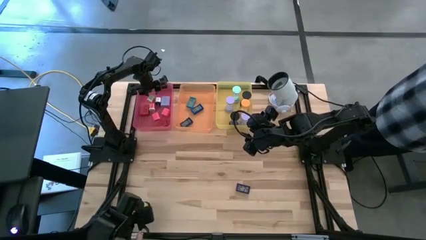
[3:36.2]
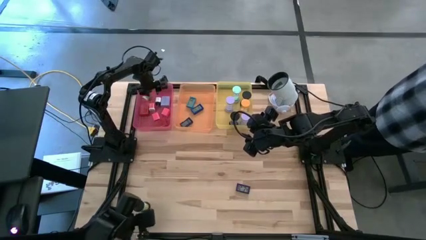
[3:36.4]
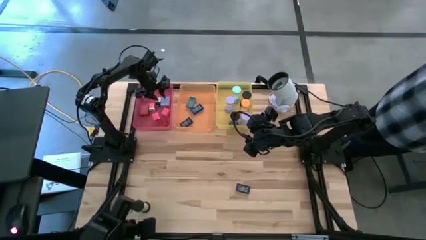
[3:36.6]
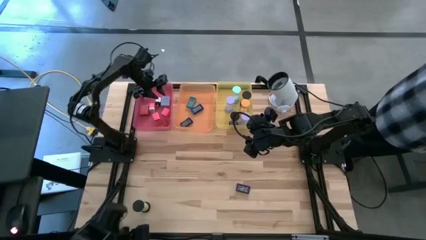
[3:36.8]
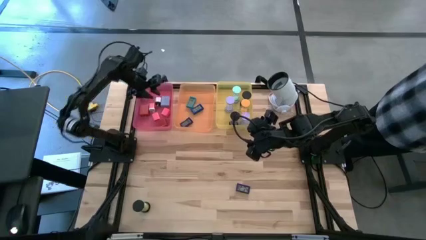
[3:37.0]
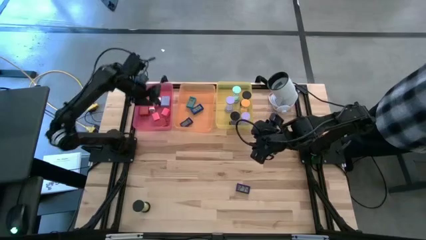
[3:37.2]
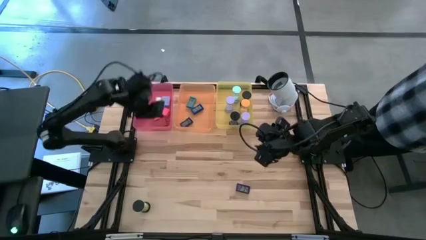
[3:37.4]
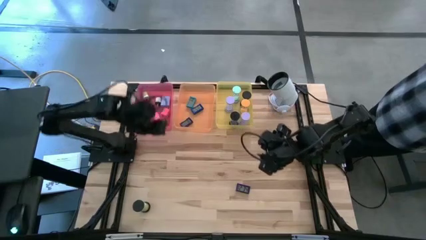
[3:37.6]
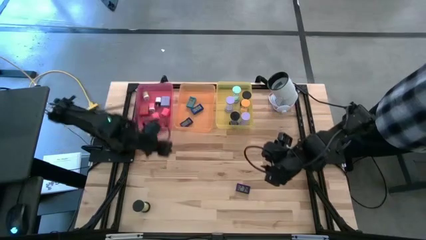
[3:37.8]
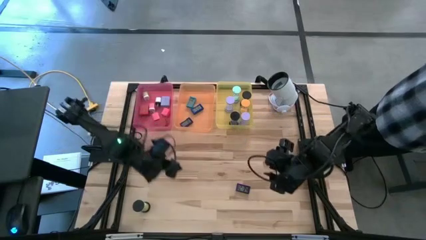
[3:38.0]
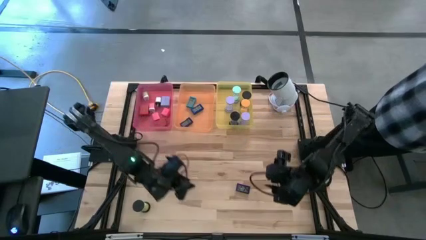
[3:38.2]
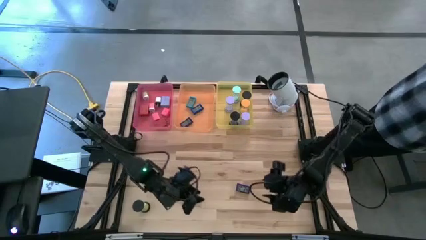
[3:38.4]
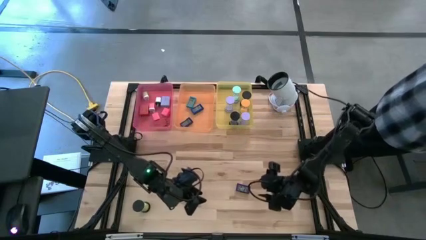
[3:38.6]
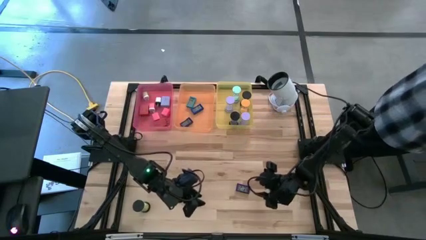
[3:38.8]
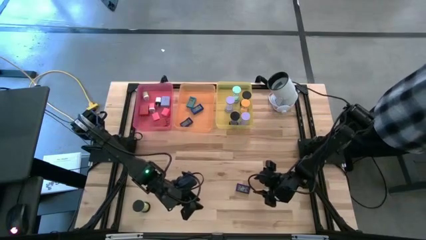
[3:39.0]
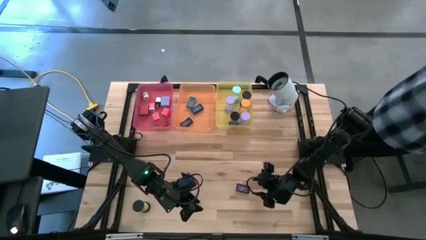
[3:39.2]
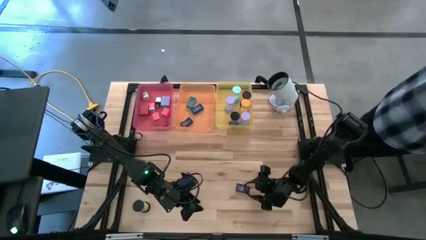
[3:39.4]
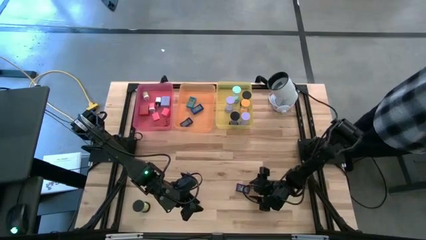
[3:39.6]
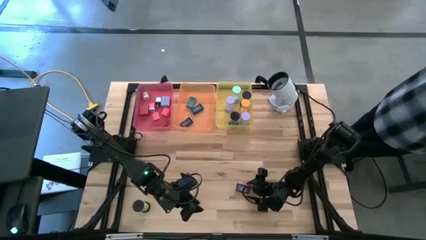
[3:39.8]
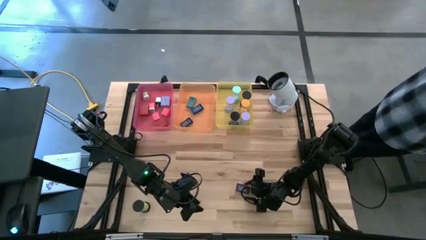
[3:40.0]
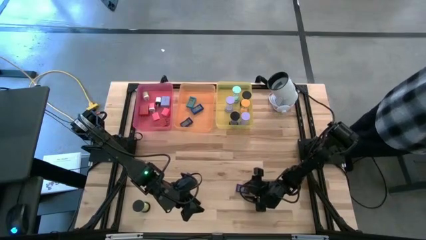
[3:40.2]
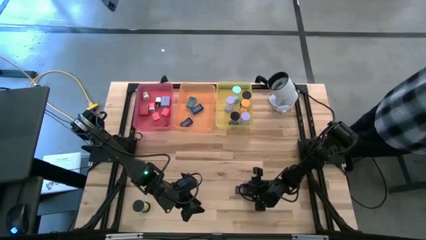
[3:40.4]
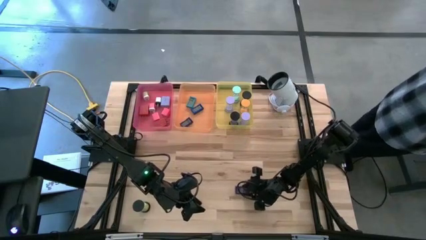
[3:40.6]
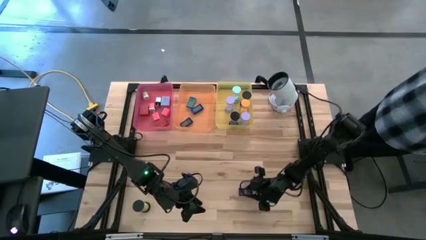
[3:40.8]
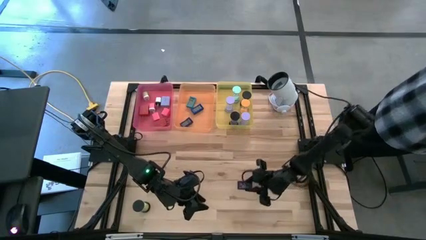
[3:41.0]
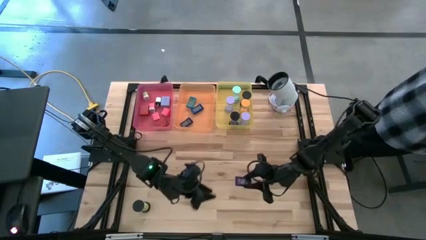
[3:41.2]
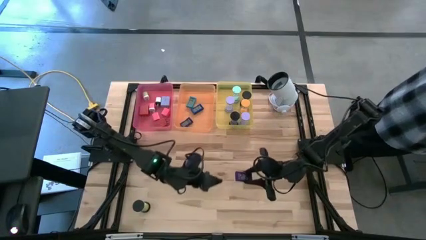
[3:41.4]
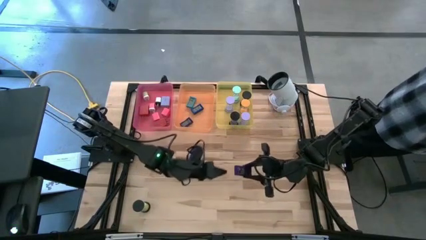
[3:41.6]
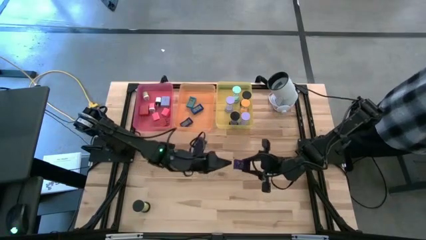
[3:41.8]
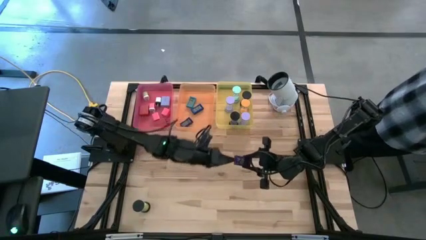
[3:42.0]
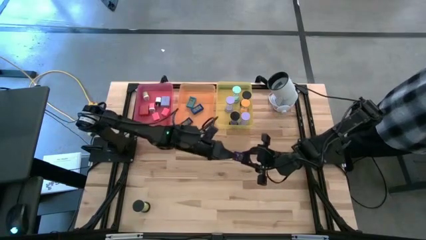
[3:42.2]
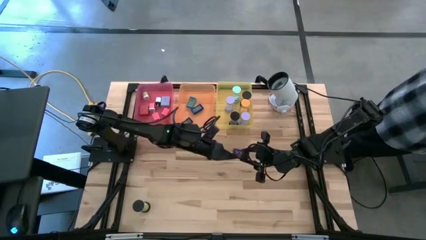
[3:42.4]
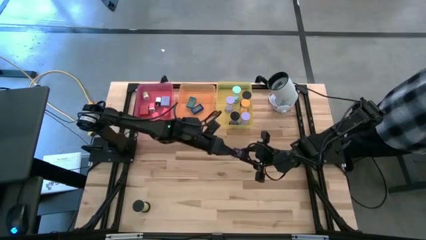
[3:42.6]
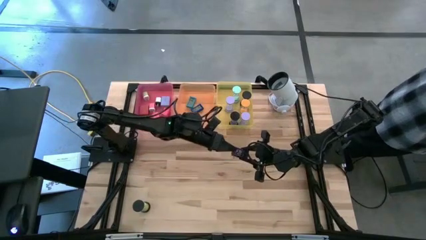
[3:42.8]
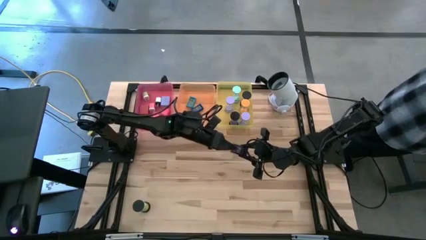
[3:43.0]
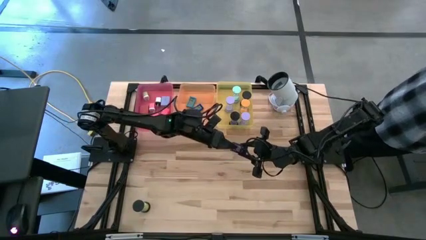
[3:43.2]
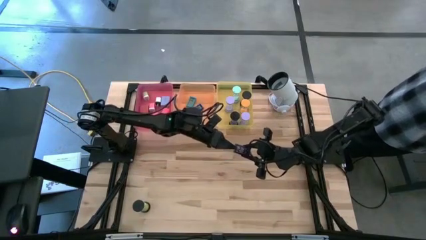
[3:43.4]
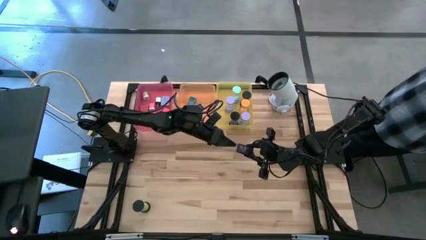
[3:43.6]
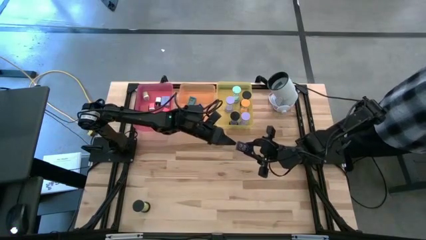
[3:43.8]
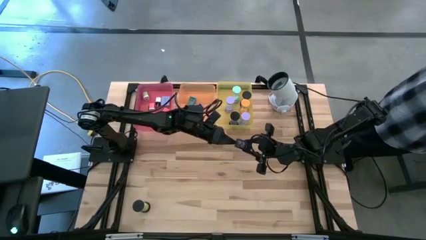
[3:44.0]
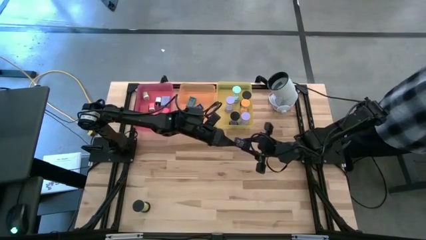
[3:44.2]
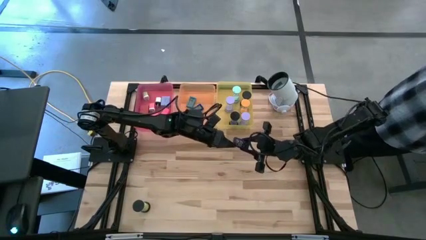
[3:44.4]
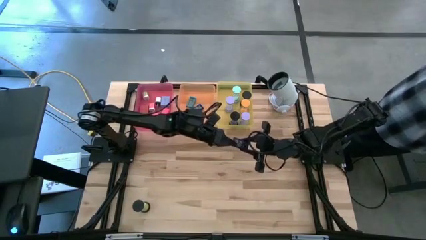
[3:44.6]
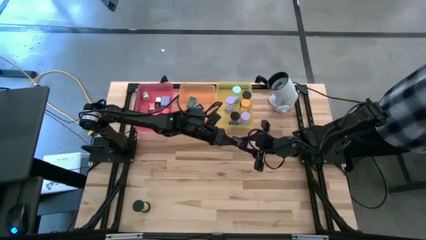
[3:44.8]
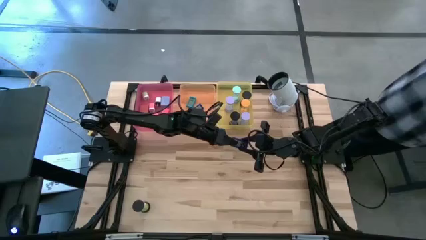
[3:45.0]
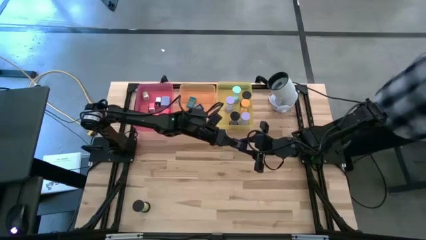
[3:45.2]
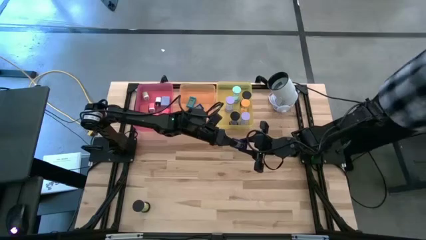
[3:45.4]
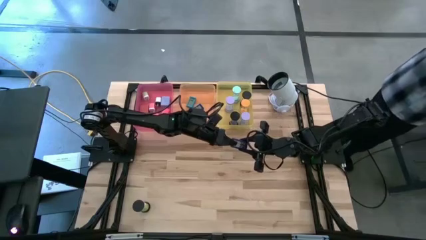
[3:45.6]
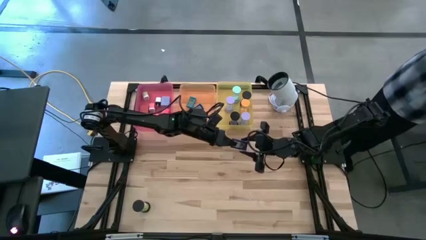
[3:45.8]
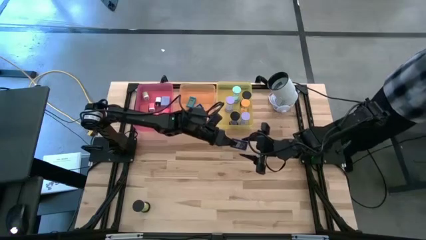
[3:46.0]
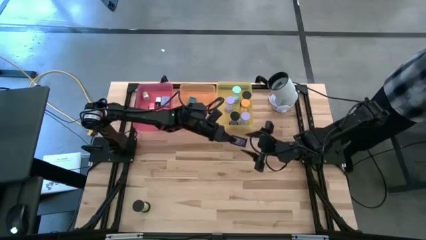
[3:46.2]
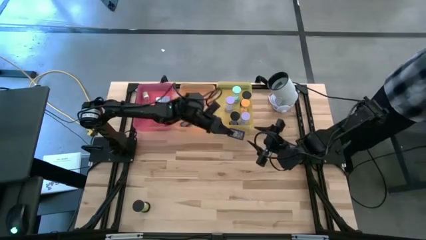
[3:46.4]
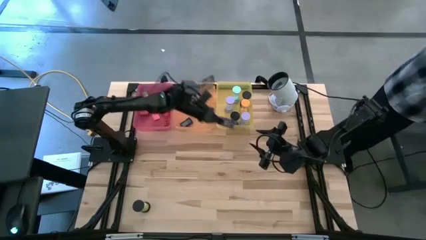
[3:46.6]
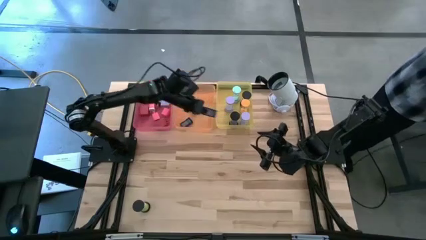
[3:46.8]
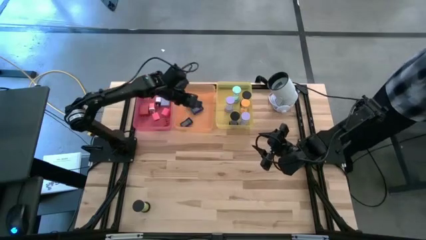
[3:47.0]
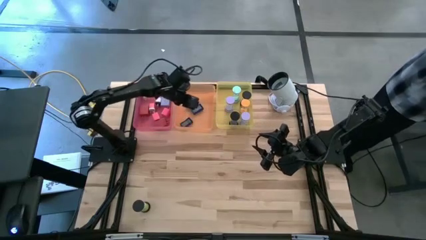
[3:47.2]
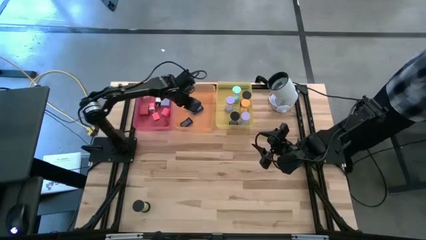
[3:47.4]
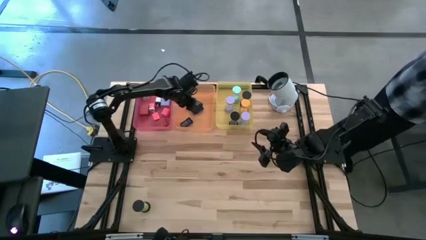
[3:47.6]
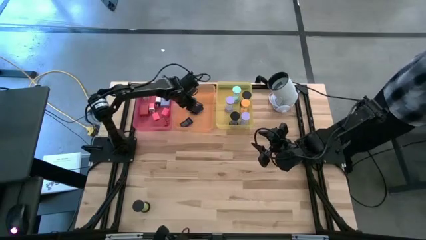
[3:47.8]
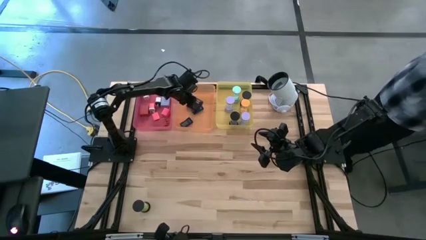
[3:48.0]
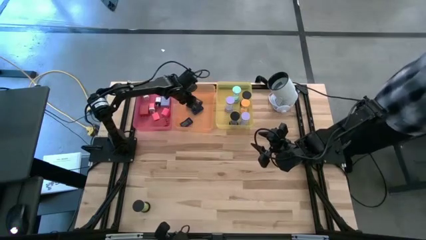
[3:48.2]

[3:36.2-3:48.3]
Task: Pick & Place Office items
Put the dark blue digital clock into the orange bin

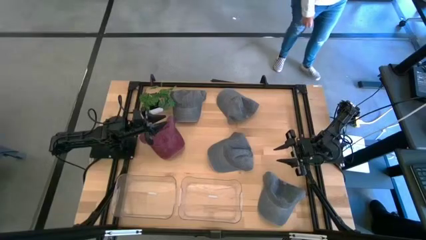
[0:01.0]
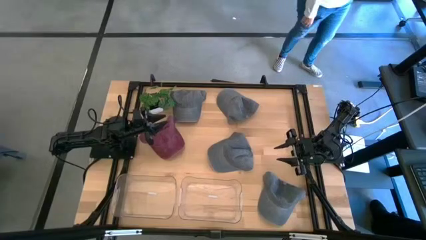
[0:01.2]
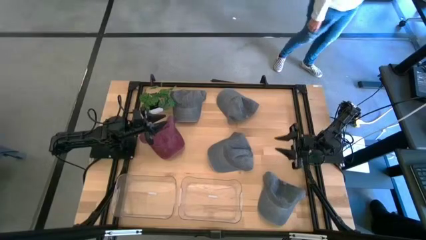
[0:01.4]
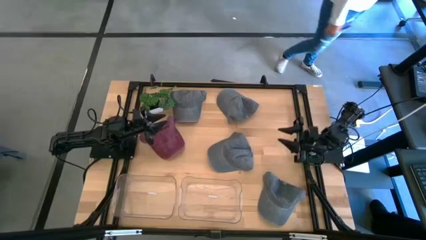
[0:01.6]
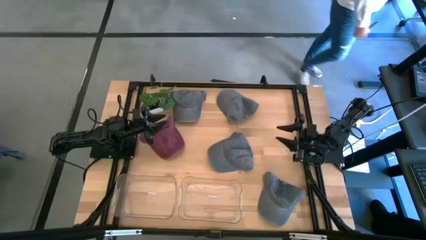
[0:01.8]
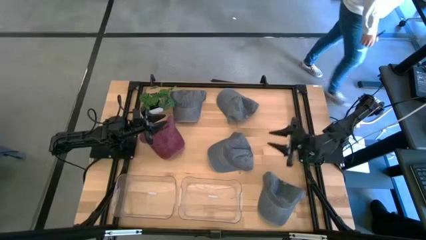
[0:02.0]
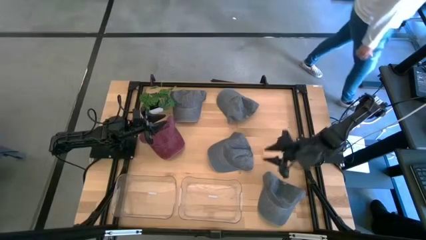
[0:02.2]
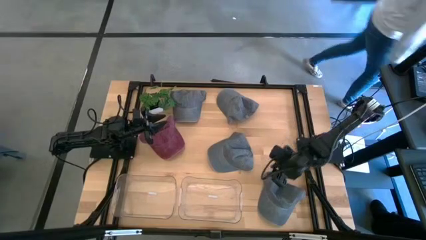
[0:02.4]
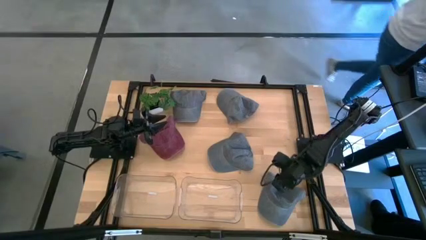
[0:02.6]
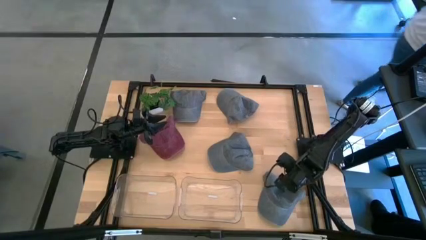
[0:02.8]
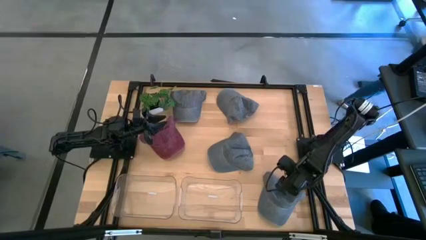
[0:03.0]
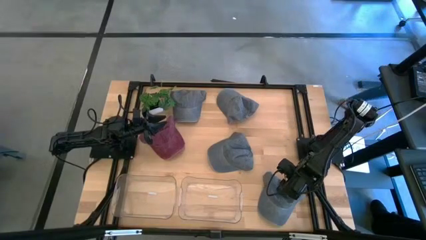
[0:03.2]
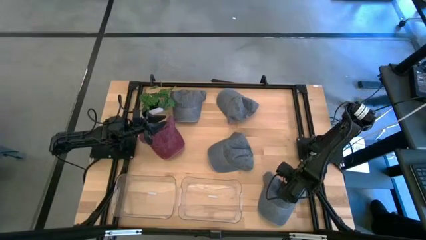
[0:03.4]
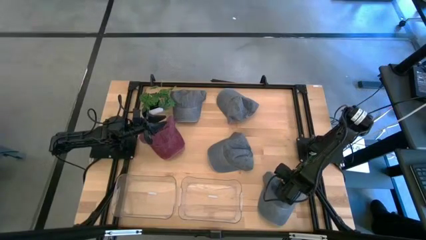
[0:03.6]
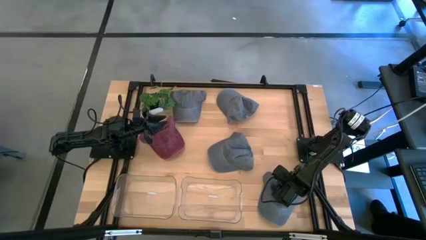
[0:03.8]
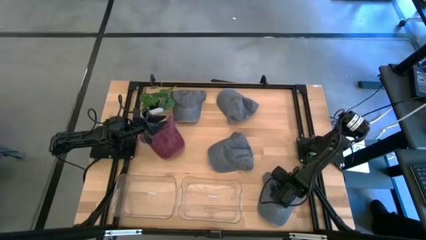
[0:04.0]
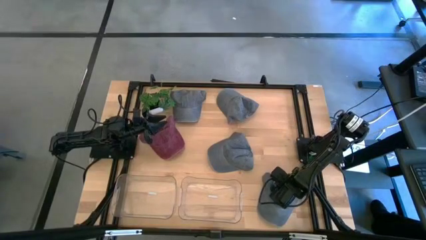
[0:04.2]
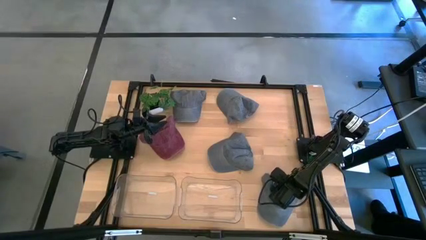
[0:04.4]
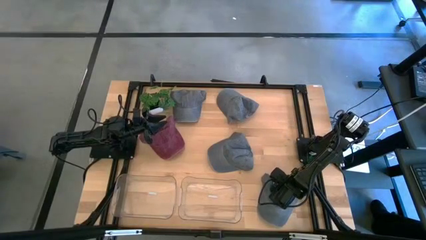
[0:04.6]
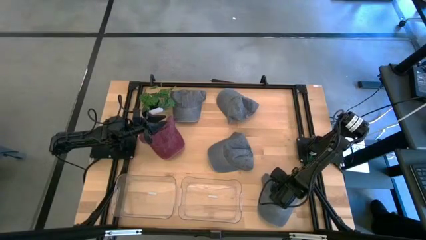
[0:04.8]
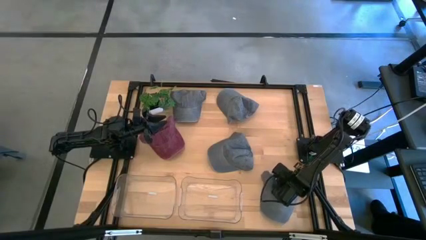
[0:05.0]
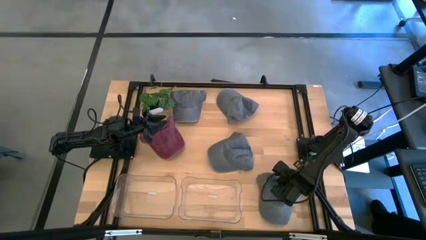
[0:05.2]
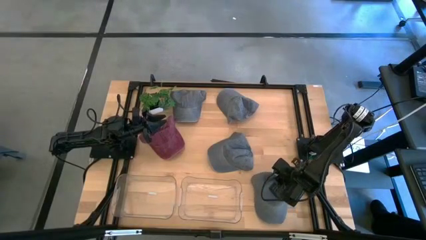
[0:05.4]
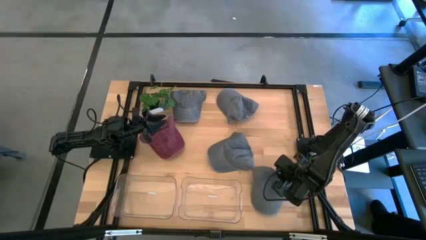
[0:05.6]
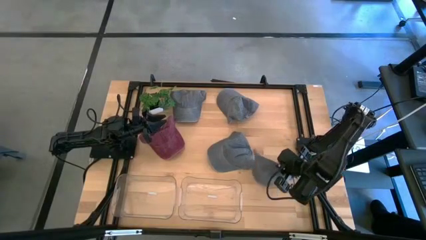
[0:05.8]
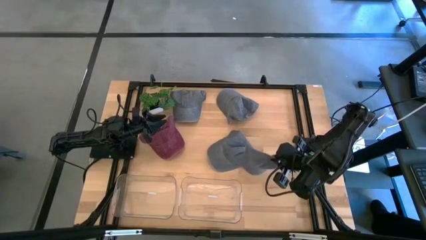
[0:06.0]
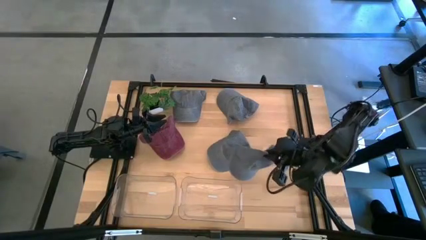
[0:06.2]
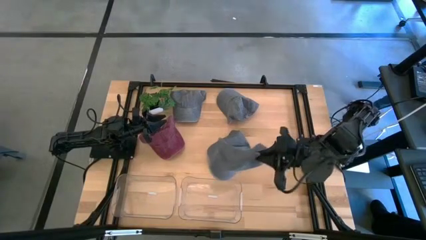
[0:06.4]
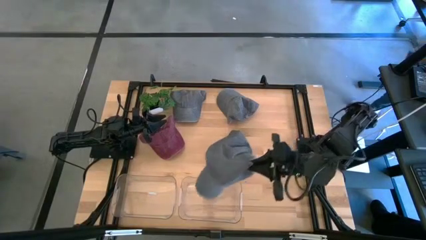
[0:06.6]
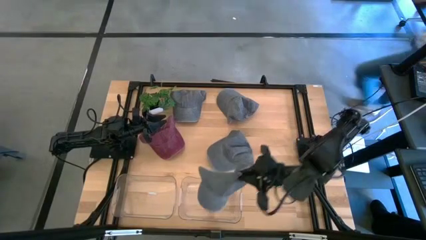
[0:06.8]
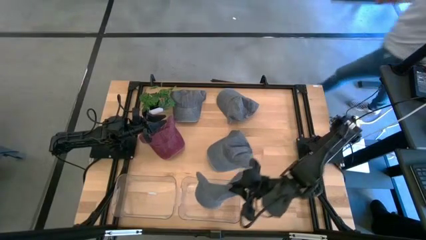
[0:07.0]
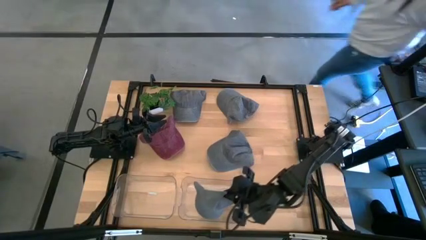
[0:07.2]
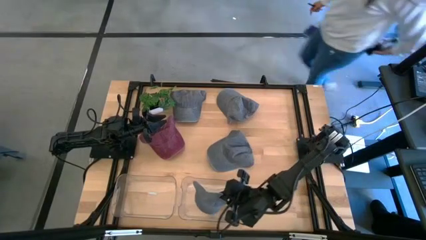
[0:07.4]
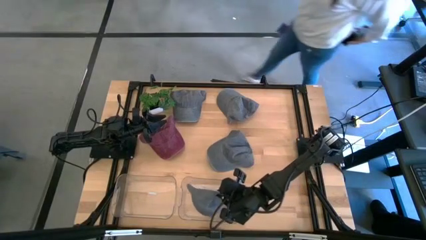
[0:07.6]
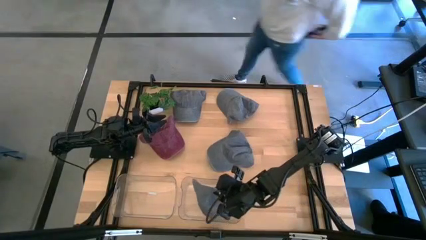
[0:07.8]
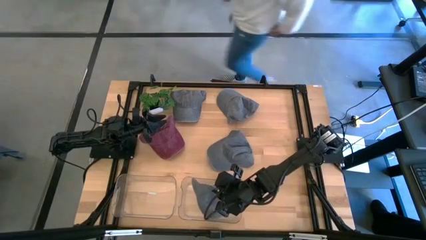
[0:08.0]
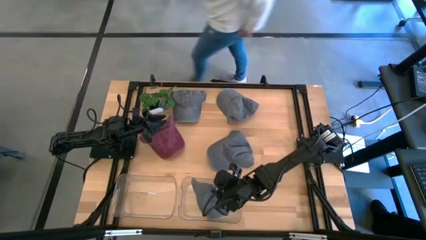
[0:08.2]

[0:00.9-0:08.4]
Task: Pick & Place hat
Put the grey cap into the right transparent bin
